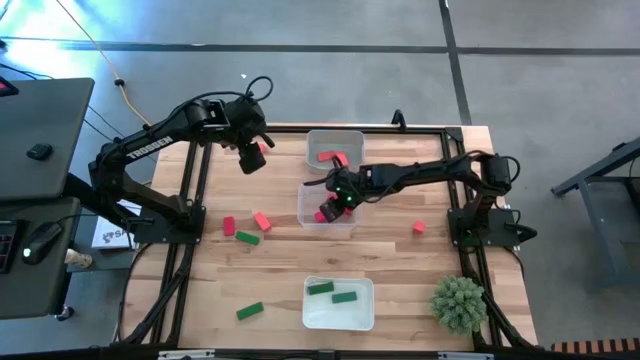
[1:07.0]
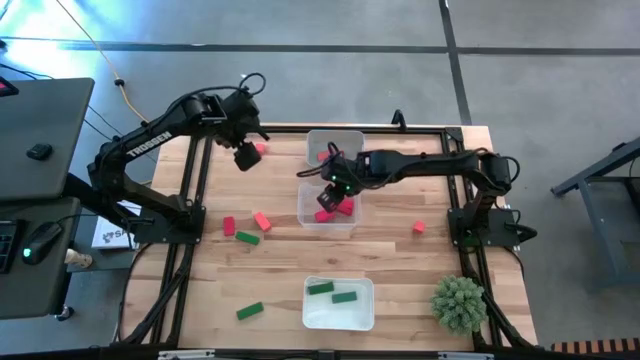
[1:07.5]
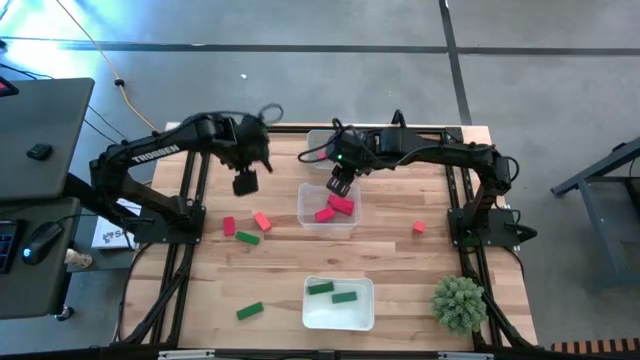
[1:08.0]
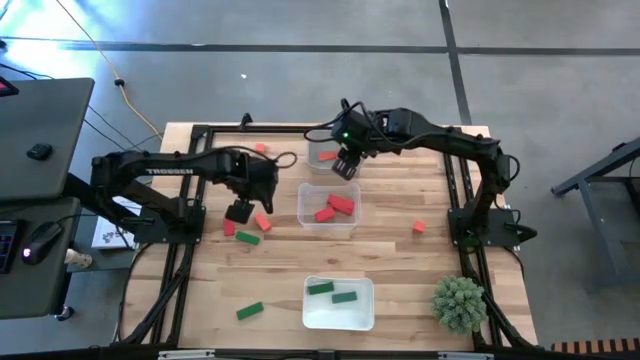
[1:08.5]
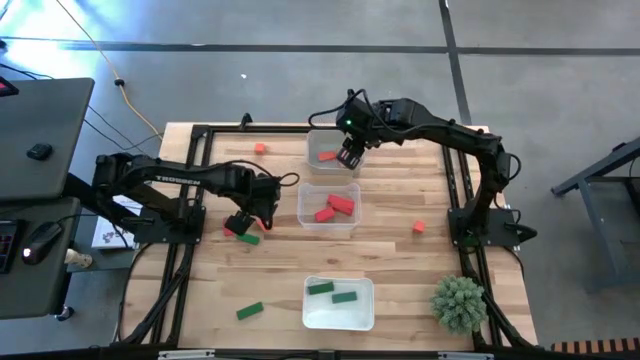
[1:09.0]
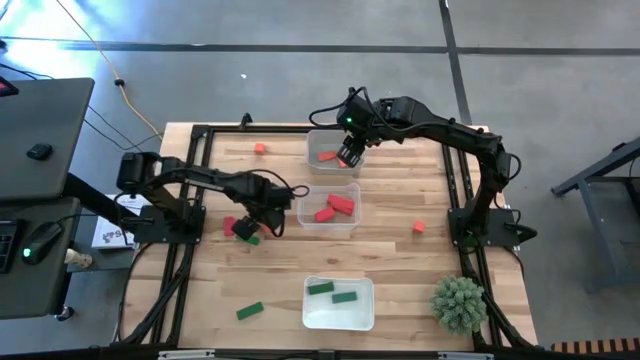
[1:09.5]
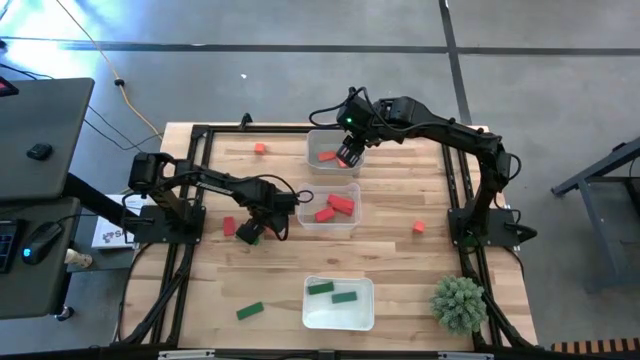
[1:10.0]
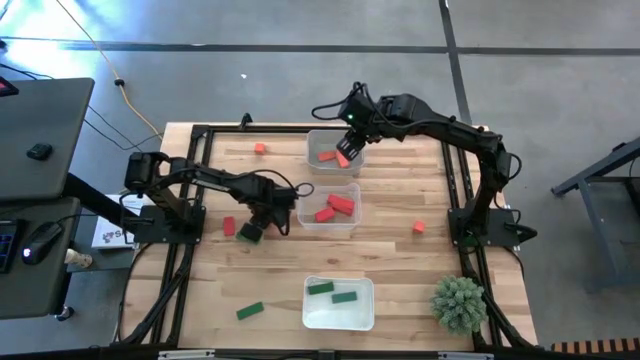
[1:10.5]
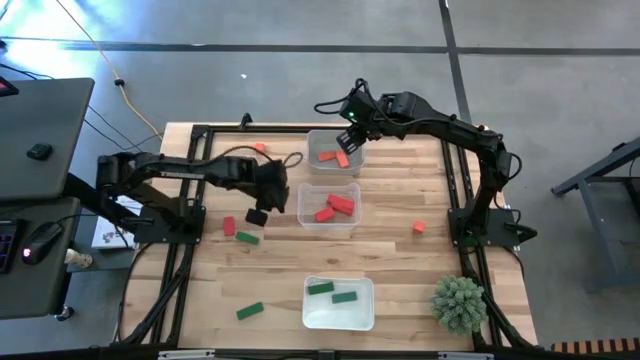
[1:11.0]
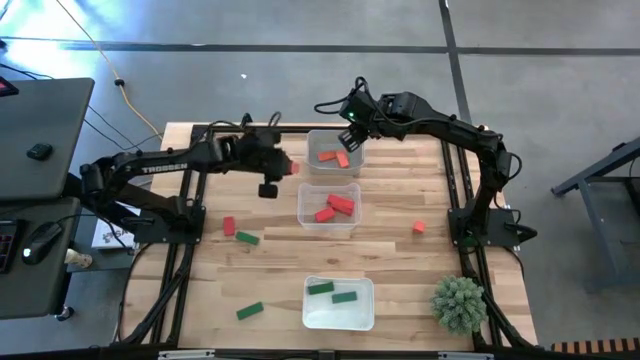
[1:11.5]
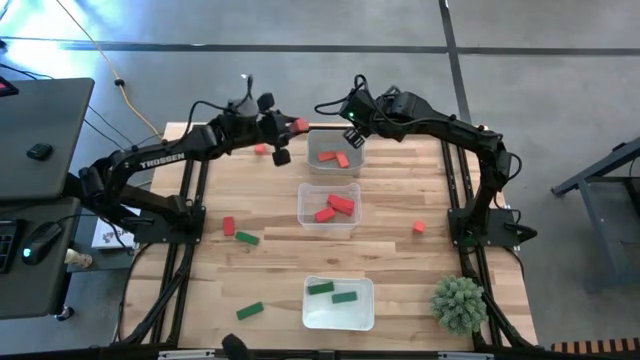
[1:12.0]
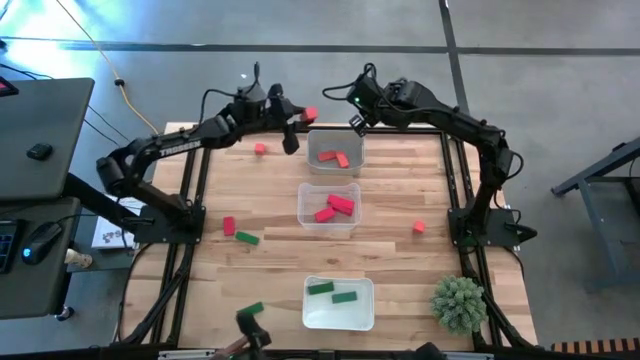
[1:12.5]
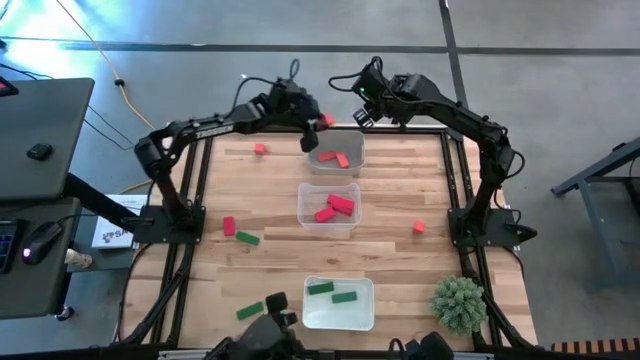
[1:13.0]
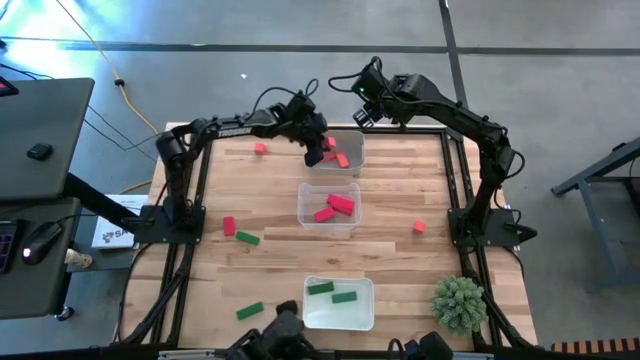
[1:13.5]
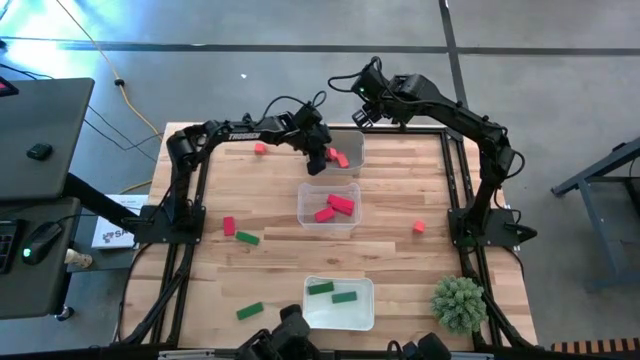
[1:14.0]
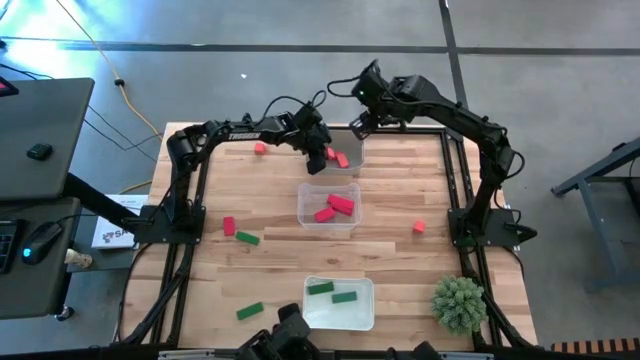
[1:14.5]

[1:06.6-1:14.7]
Task: Sort & place blocks by color
Put the orange block into the gray bin

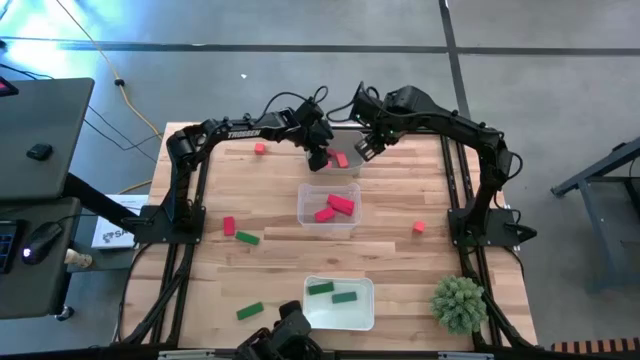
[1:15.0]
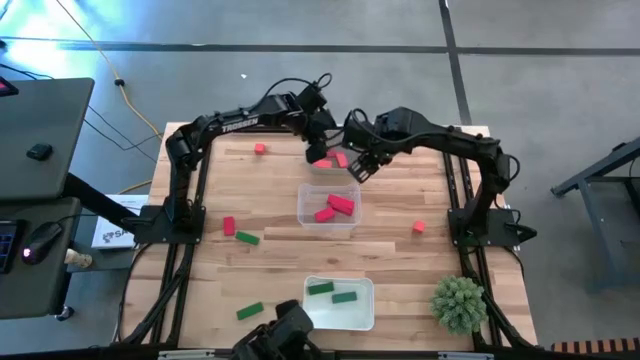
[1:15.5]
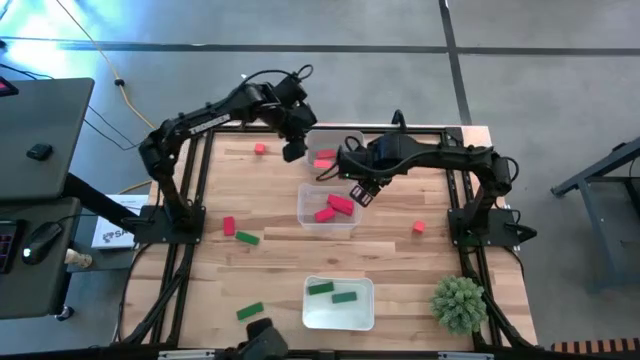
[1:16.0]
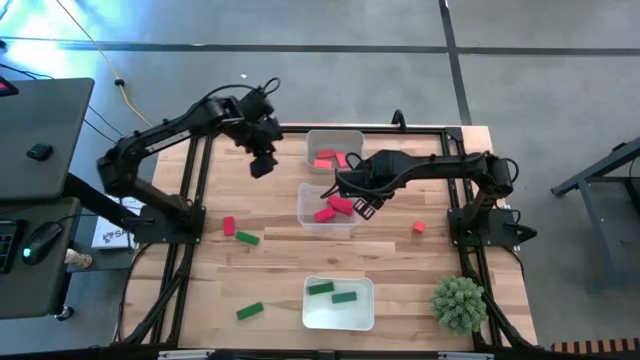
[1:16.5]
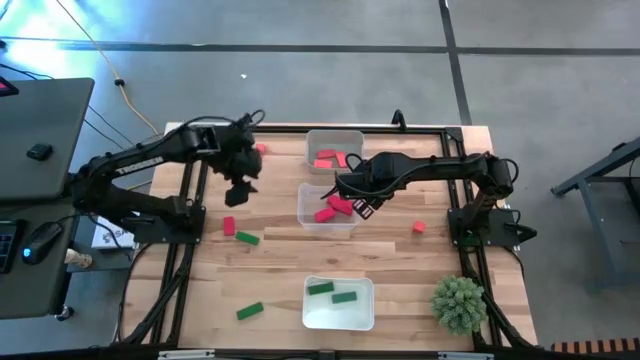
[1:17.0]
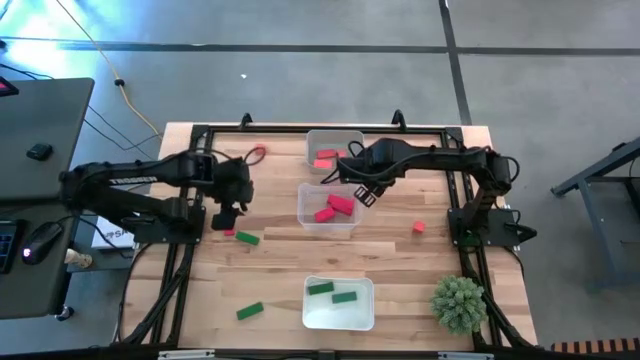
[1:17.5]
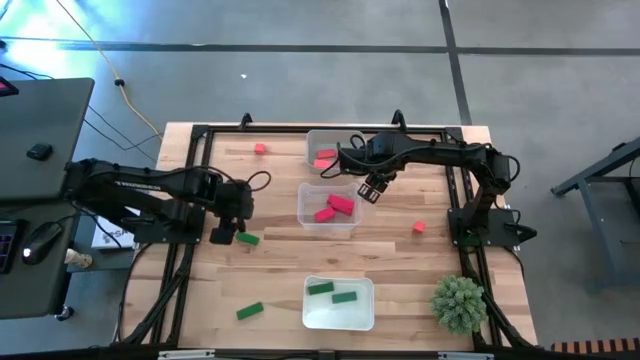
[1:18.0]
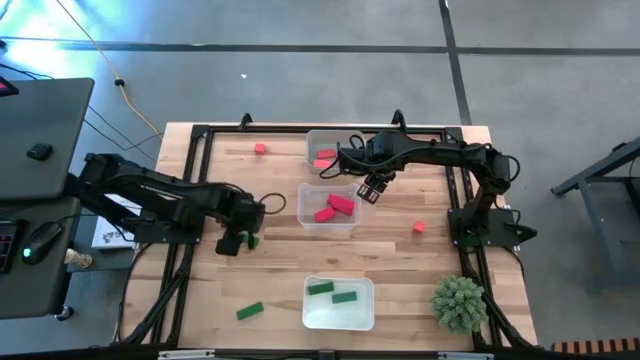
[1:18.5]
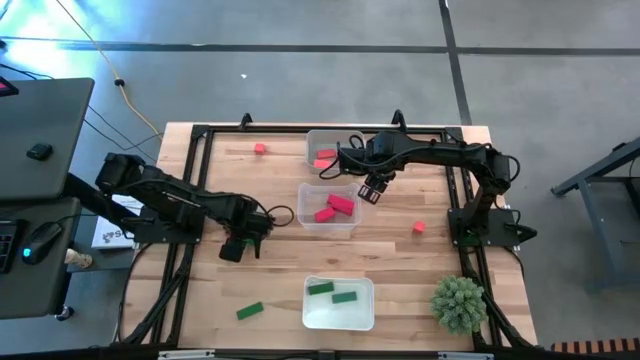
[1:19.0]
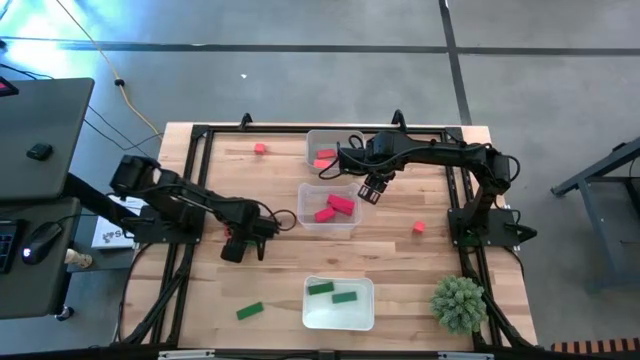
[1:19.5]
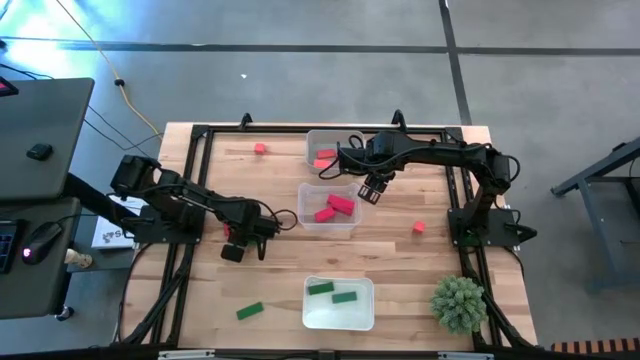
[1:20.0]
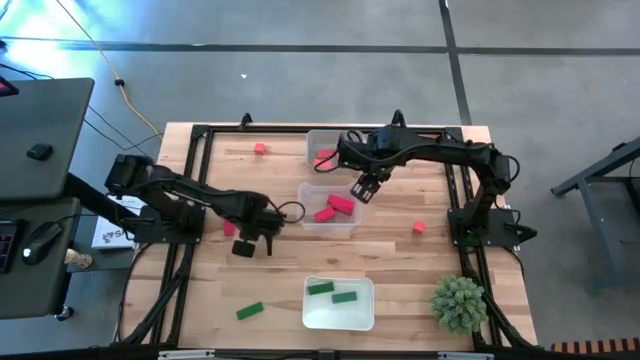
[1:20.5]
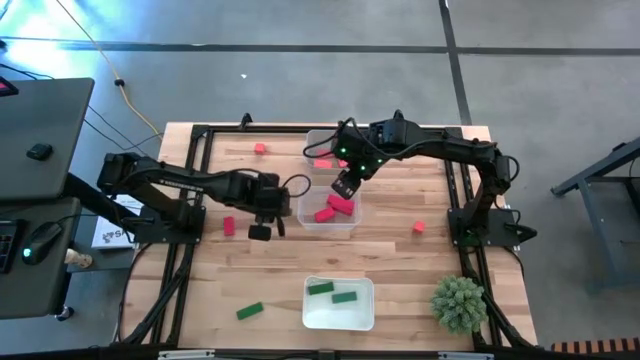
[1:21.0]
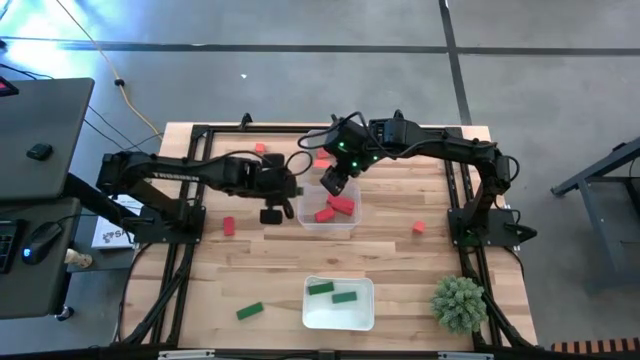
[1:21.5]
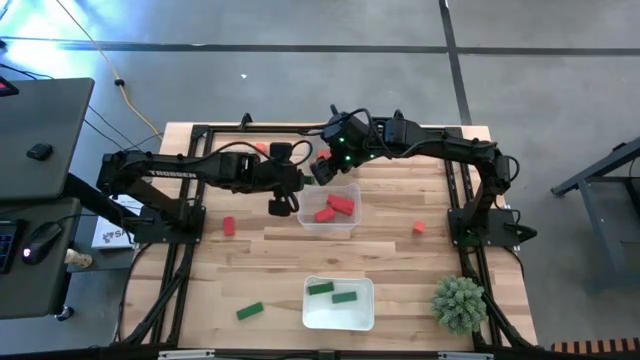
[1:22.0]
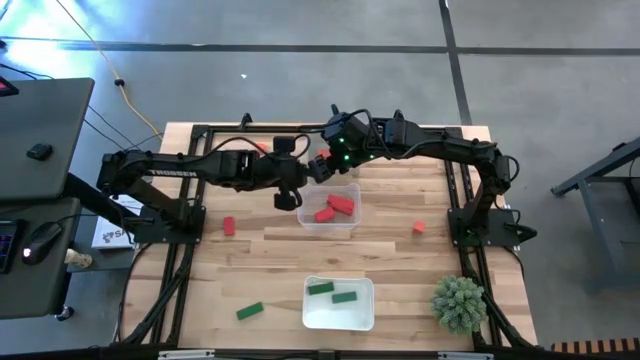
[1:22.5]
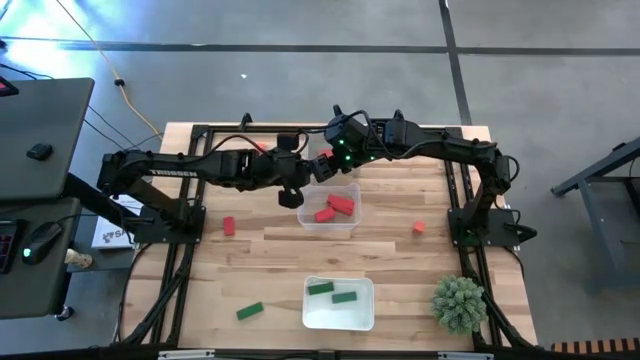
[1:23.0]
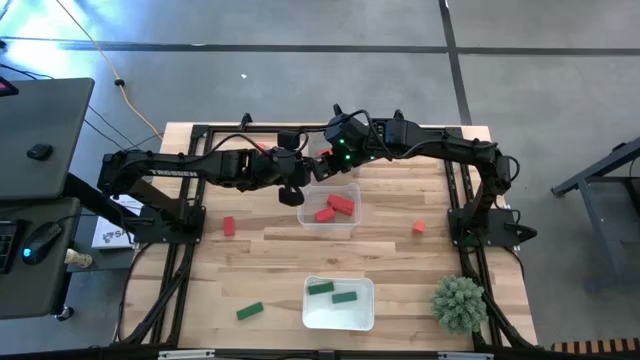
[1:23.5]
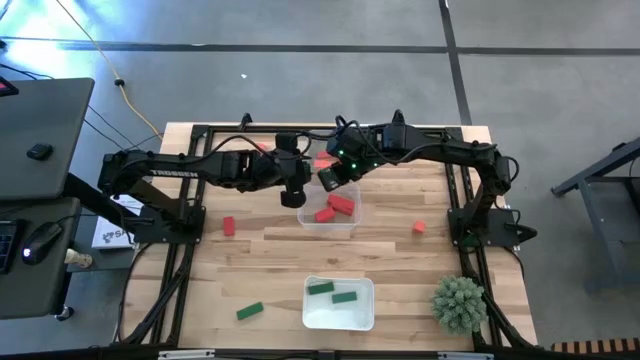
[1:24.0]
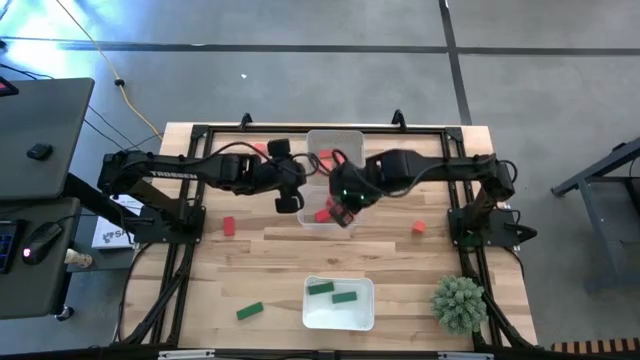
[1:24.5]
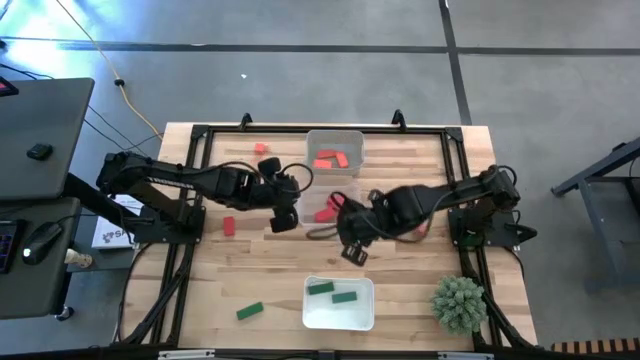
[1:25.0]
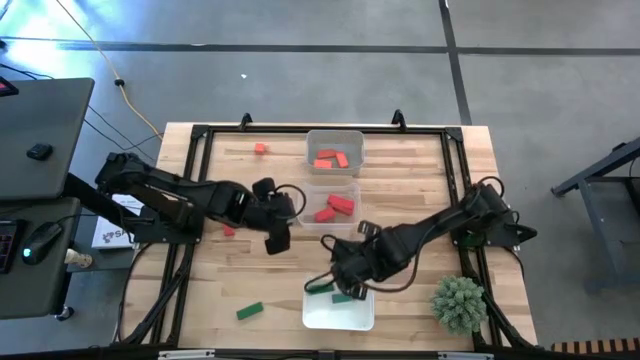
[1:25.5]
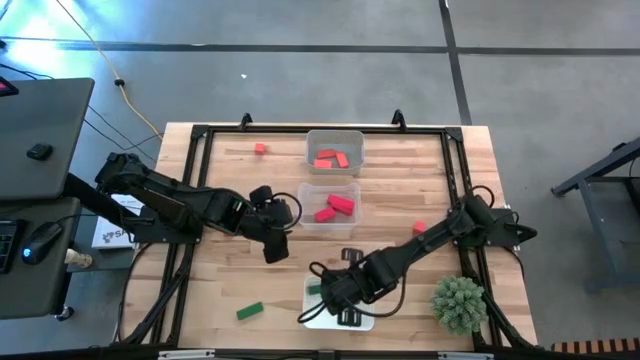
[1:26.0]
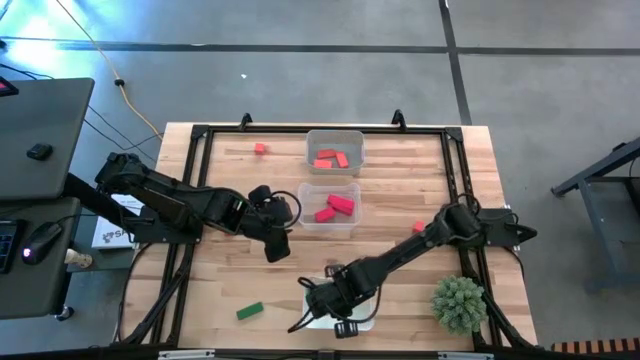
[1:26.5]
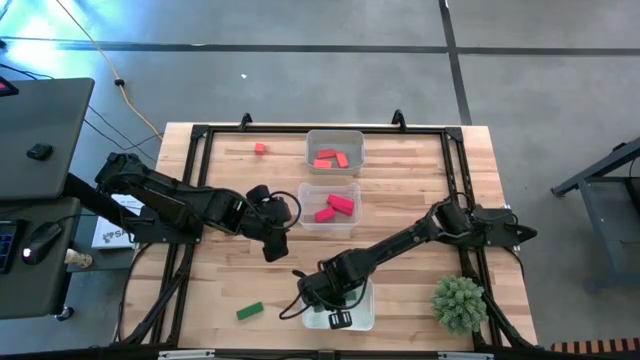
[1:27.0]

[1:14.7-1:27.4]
Put the green block into the white bin
